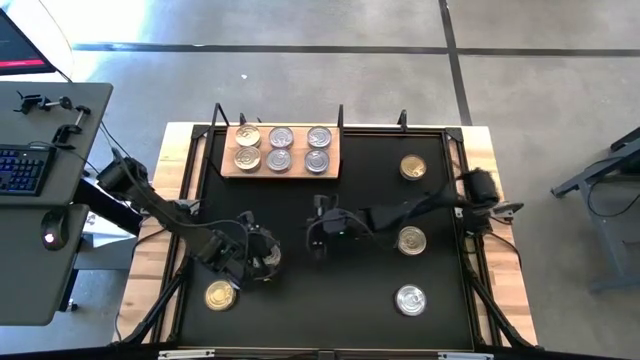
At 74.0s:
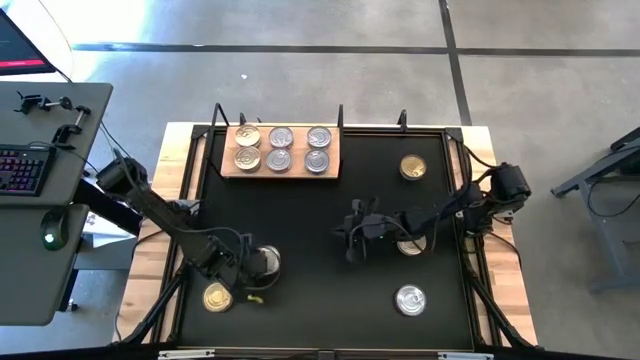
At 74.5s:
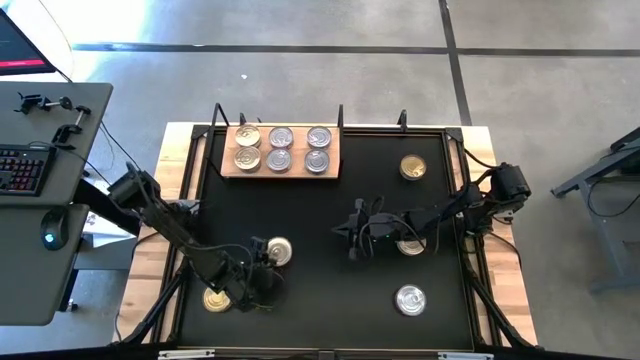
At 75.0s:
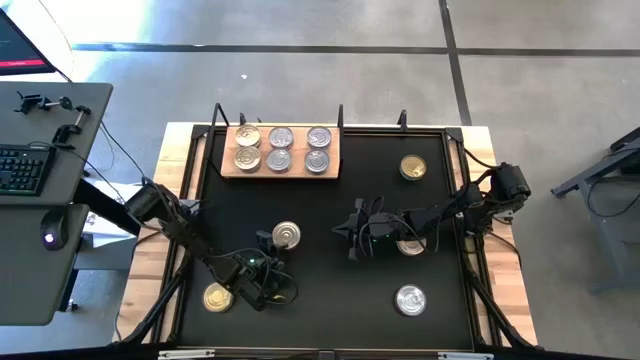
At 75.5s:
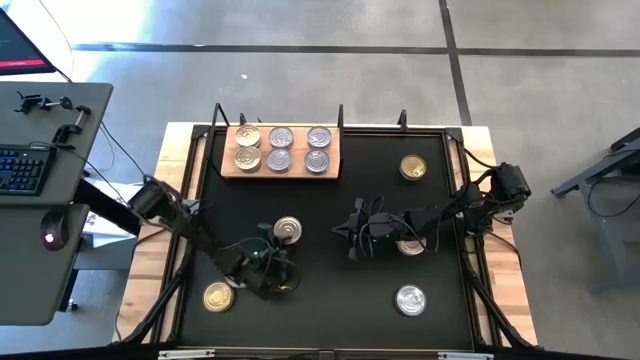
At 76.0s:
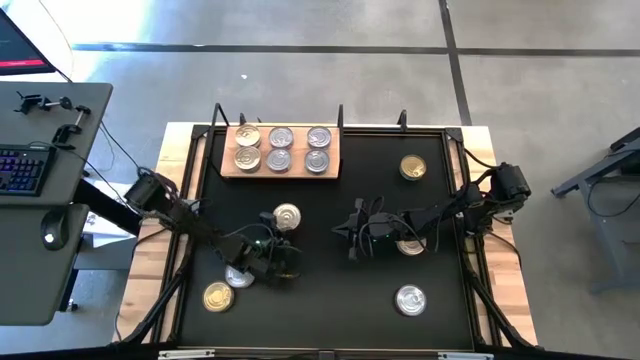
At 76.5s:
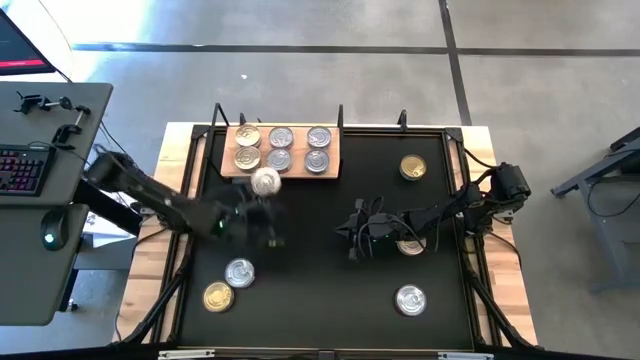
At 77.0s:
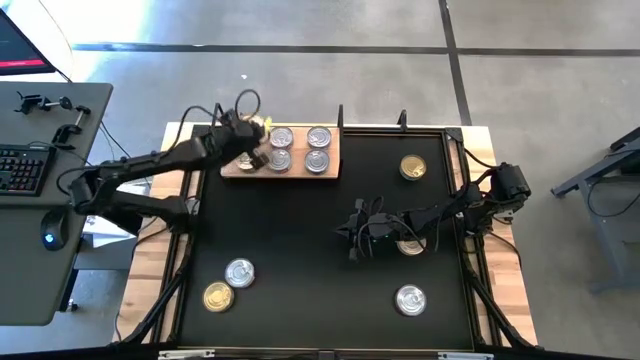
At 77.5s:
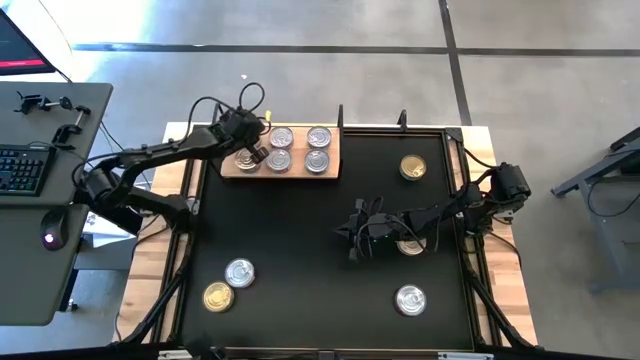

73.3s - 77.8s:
Task: Stack canned seafood by type on shelf
Stack the blue tuna can on top of the blue tuna can on the shelf

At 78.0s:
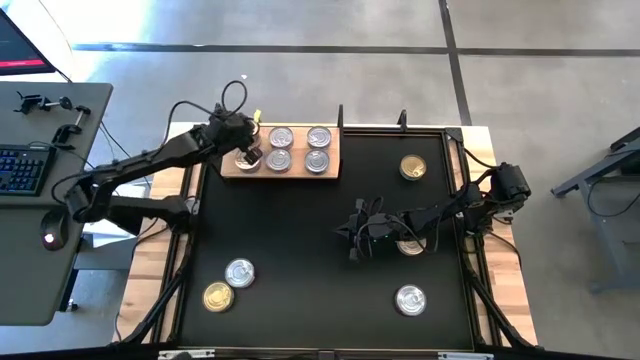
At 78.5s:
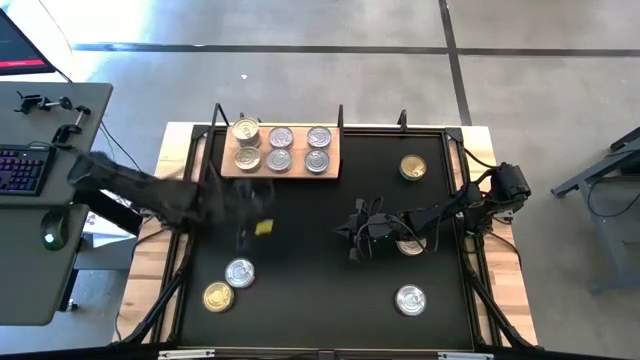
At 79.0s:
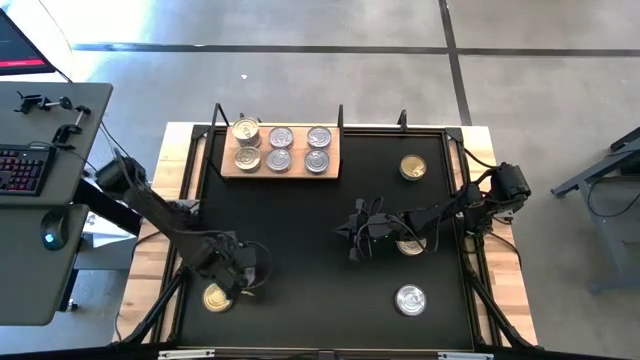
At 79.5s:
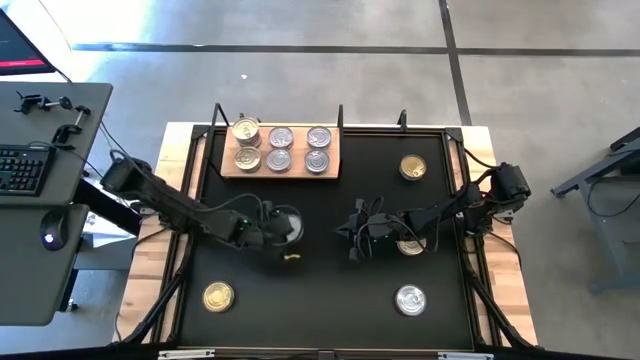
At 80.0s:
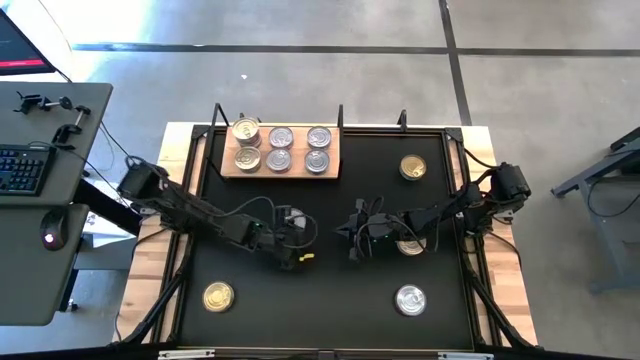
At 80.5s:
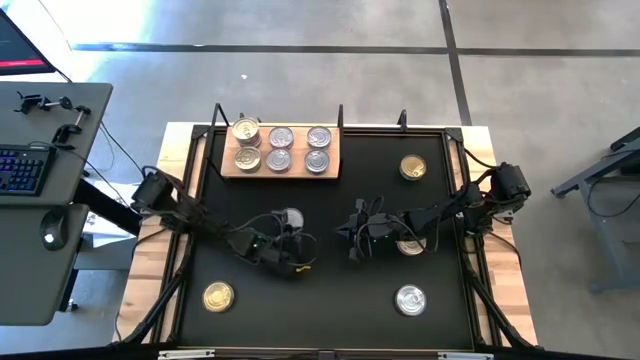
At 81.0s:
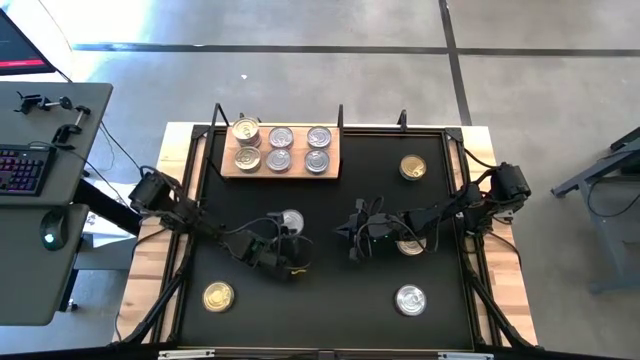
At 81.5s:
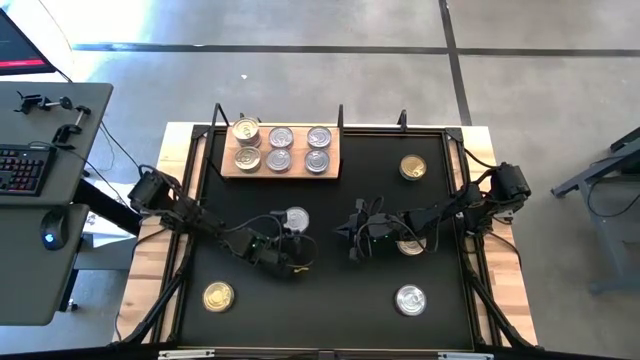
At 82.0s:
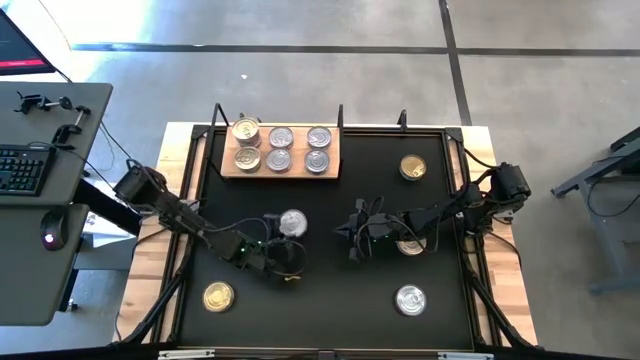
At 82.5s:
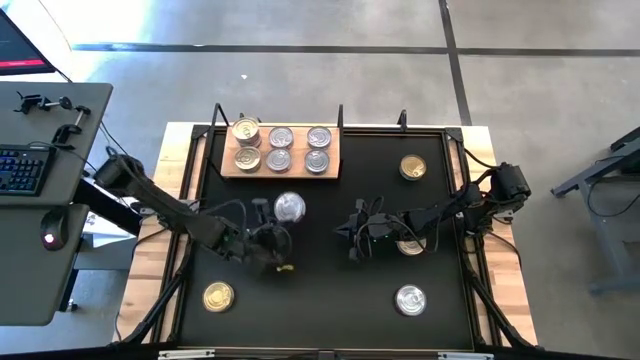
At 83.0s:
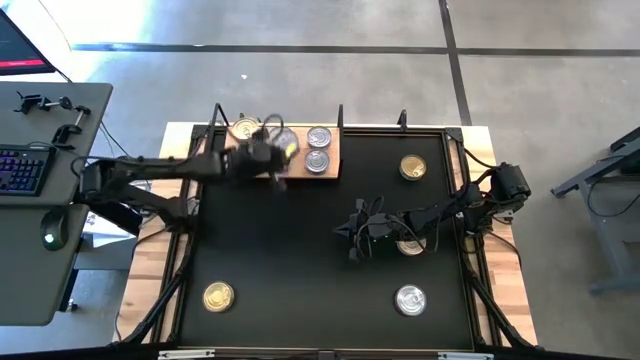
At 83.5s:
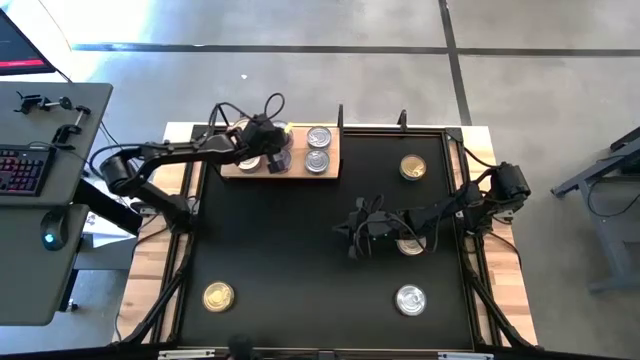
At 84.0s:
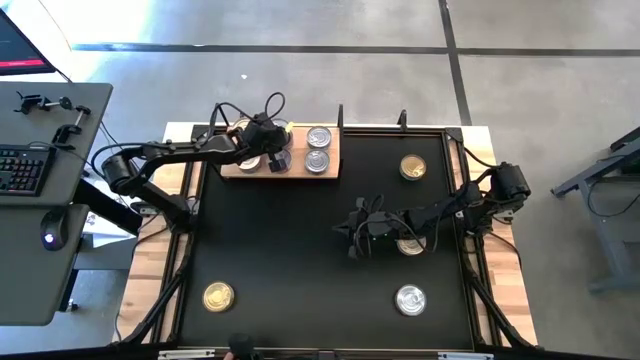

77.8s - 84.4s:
Stack the red tuna can on top of the red tuna can on the shelf

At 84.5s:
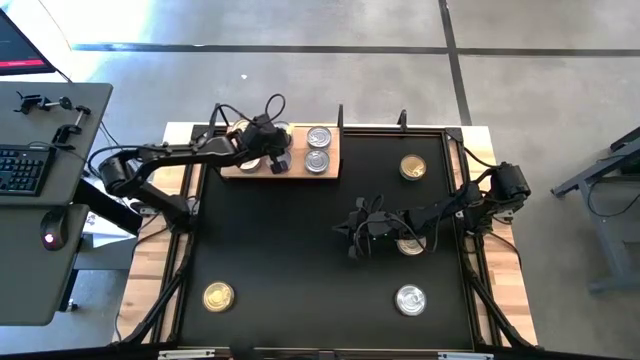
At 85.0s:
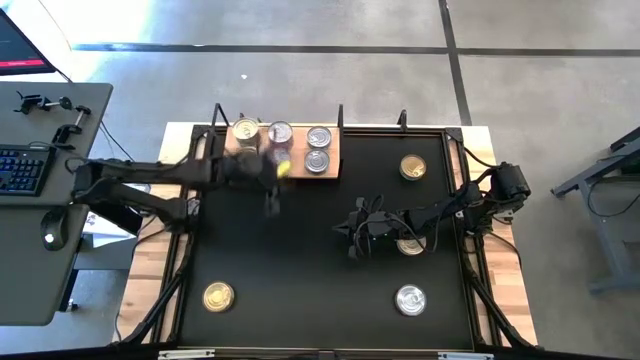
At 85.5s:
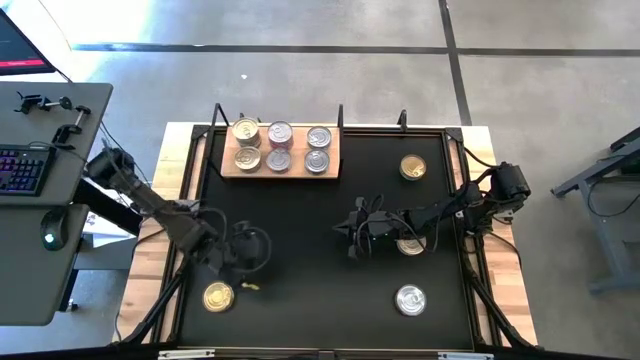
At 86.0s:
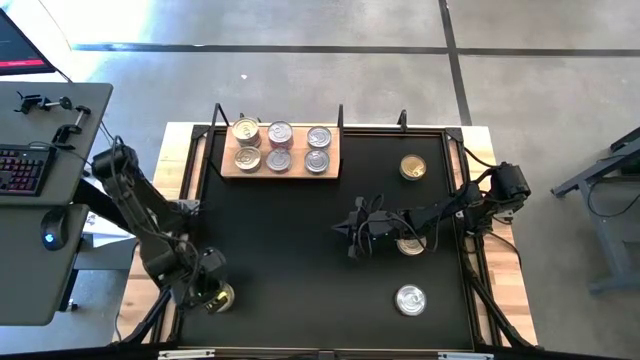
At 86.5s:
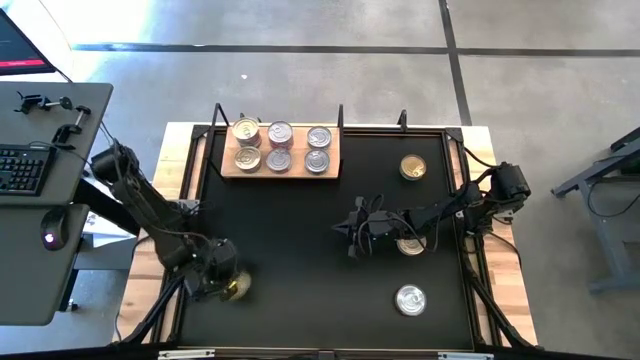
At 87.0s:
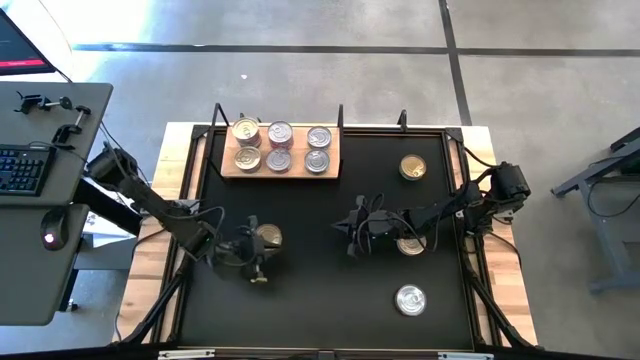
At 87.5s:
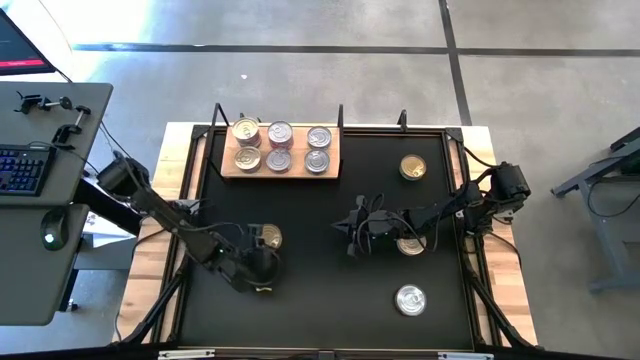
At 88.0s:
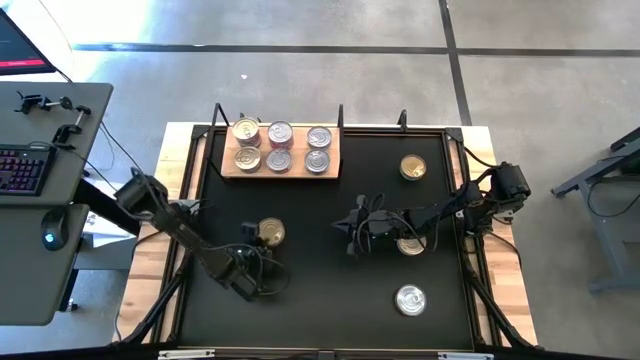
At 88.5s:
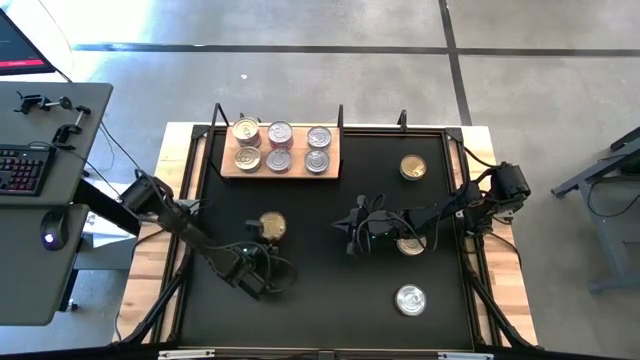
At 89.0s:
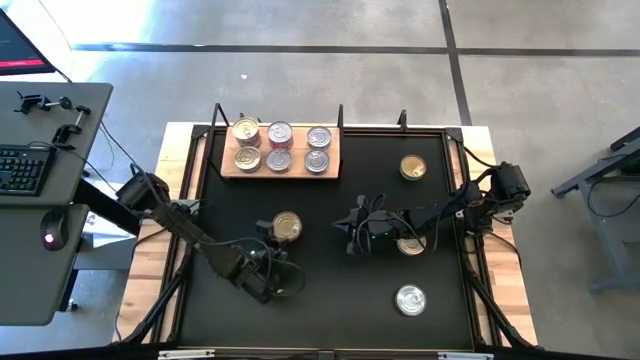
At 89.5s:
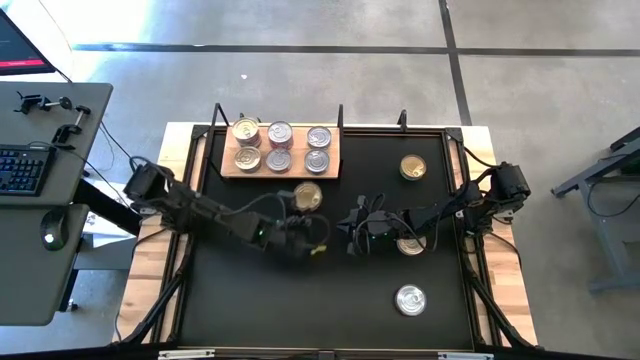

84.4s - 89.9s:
Stack the green tuna can on top of the green tuna can on the shelf

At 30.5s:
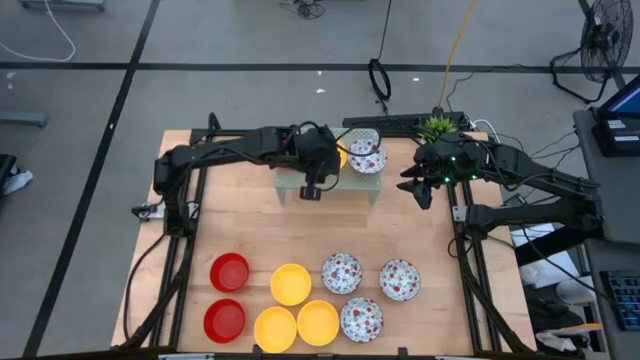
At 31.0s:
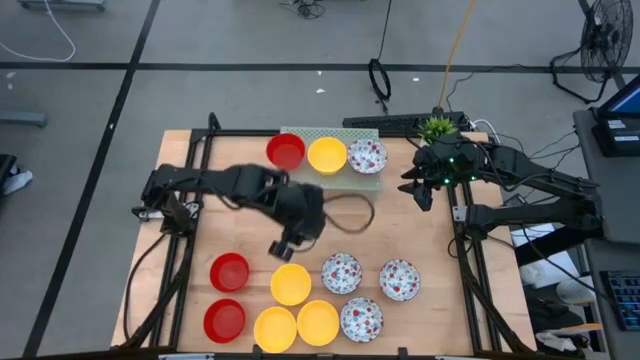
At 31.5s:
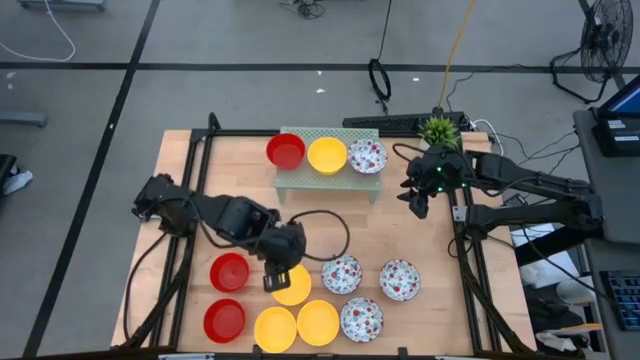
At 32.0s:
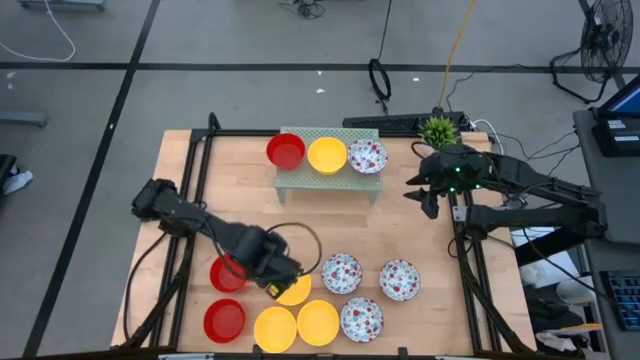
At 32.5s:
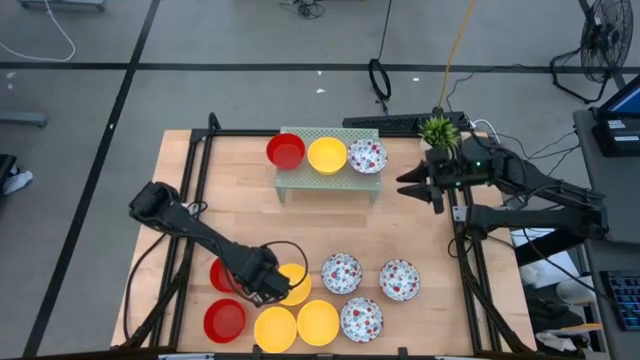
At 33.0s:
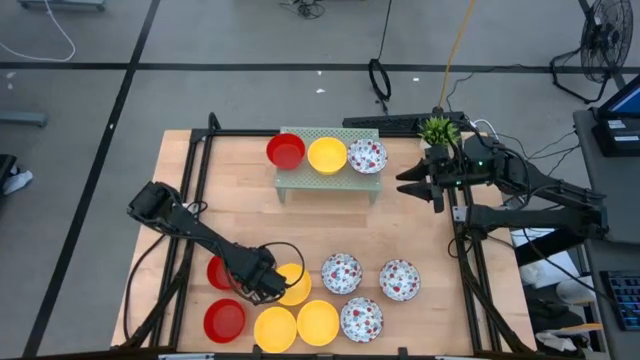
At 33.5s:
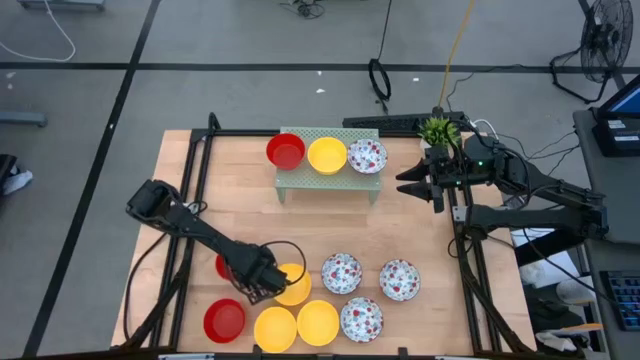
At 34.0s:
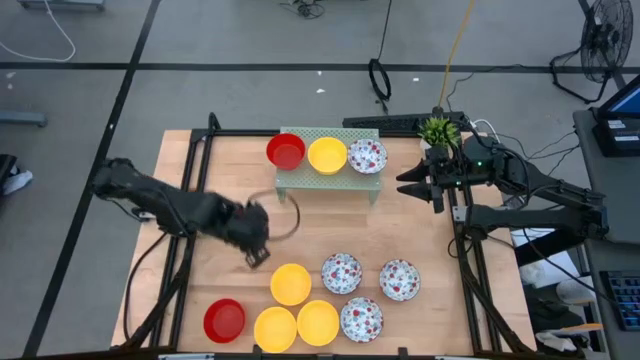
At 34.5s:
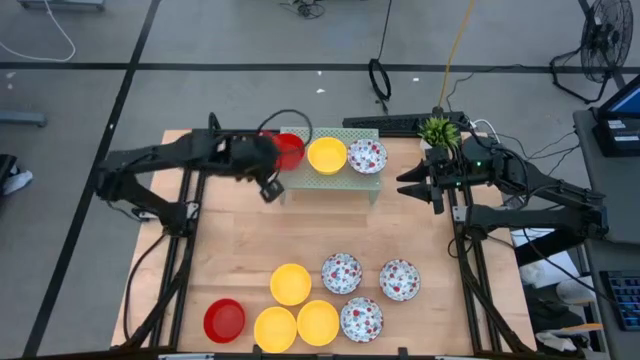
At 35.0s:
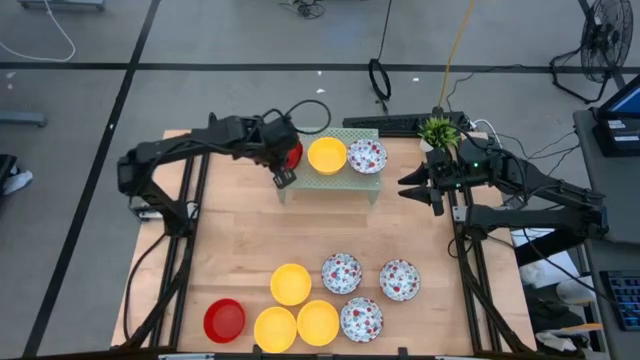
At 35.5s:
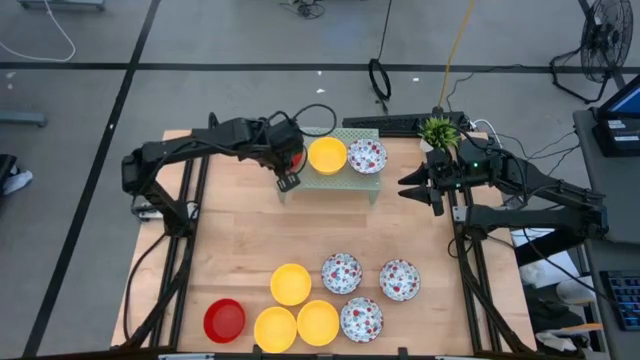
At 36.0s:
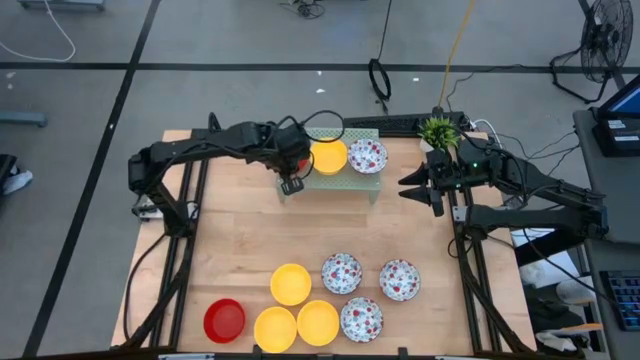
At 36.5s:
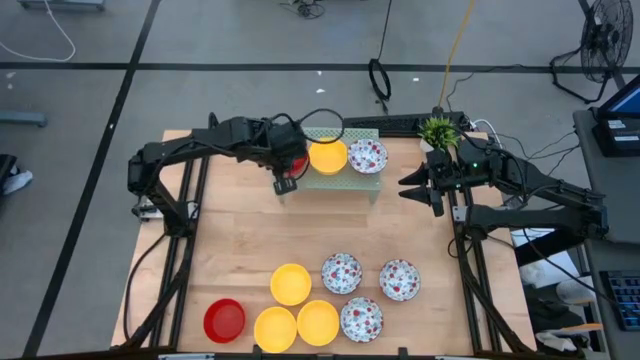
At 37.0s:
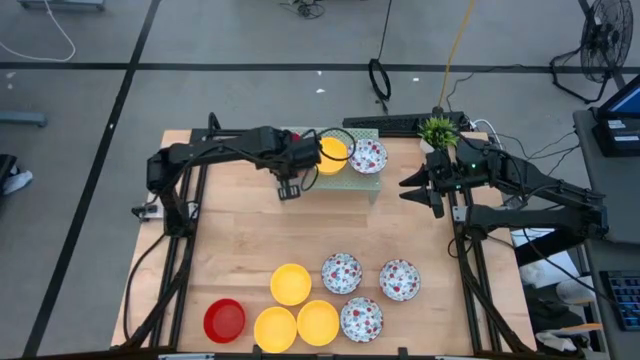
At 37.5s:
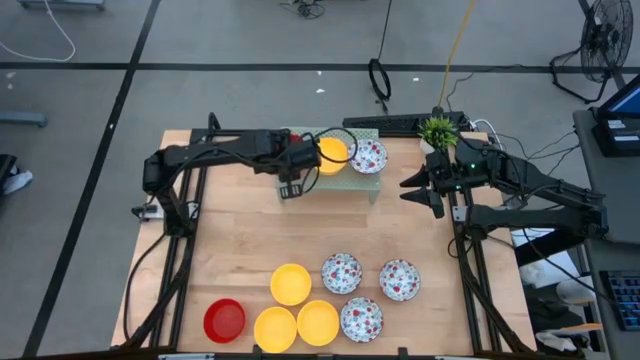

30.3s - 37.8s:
Task: Pick & Place Mini bowls
Stack the red bowl on the red bowl on the shelf
